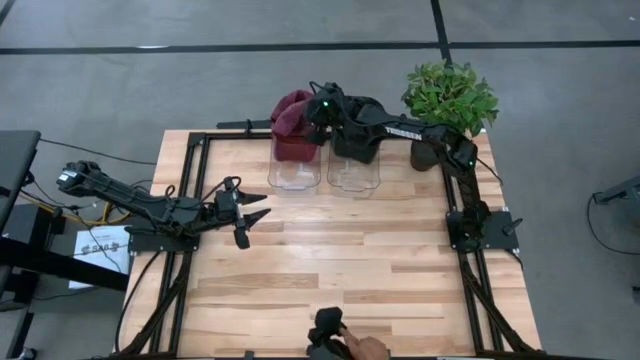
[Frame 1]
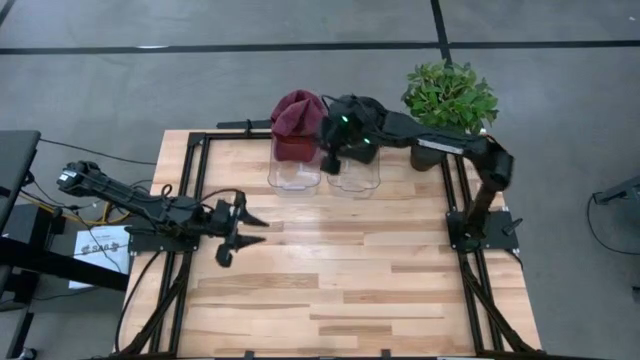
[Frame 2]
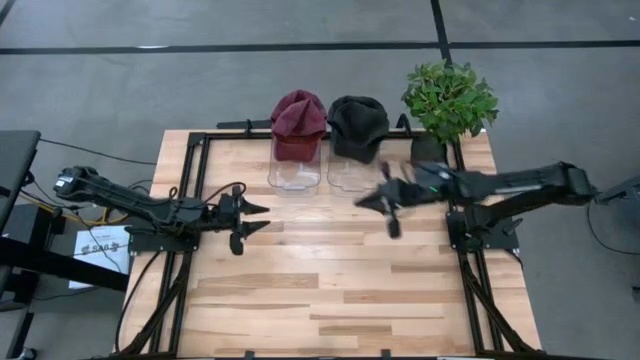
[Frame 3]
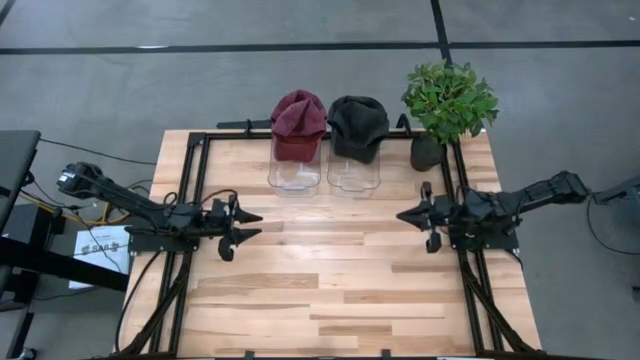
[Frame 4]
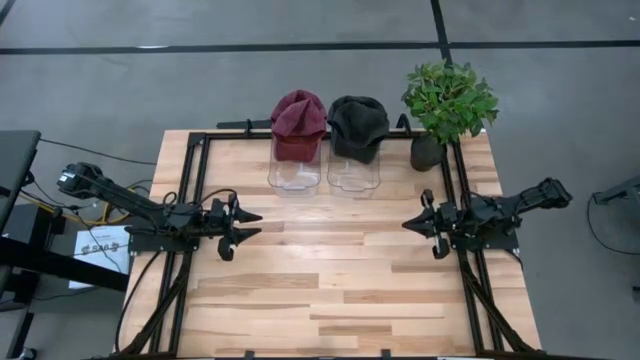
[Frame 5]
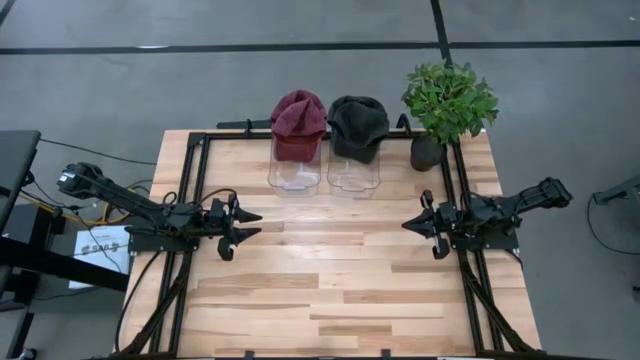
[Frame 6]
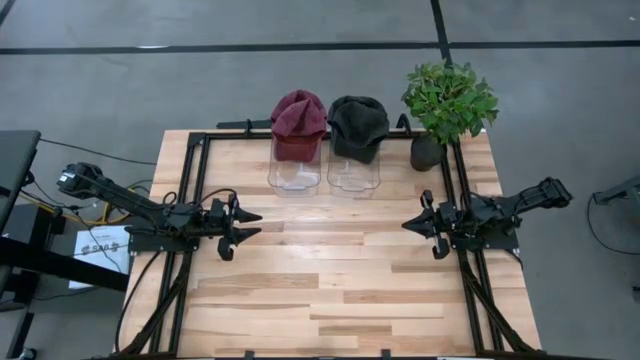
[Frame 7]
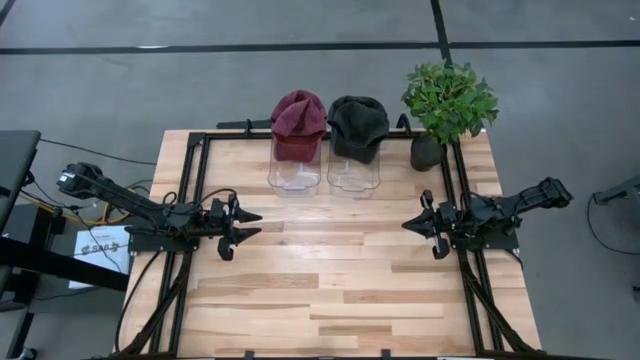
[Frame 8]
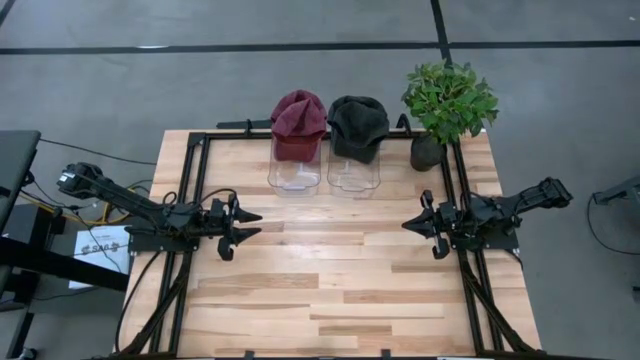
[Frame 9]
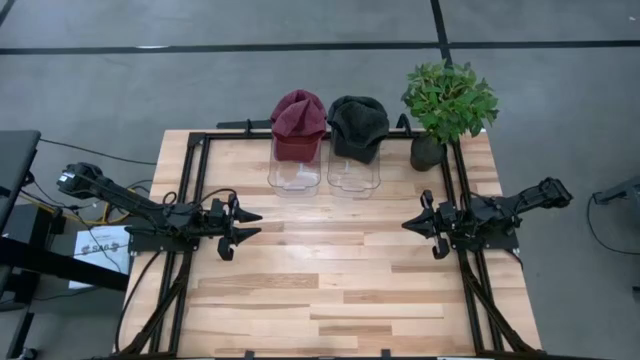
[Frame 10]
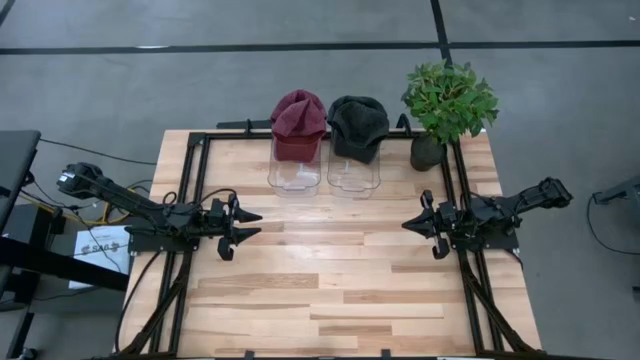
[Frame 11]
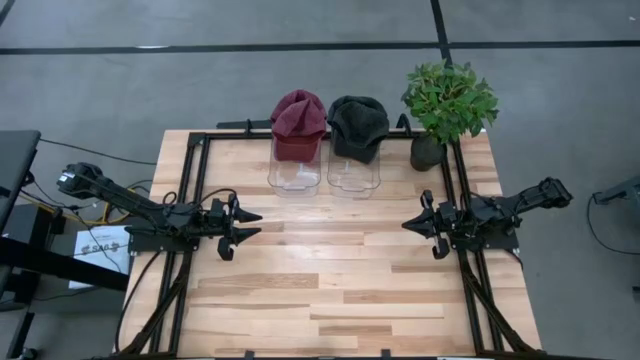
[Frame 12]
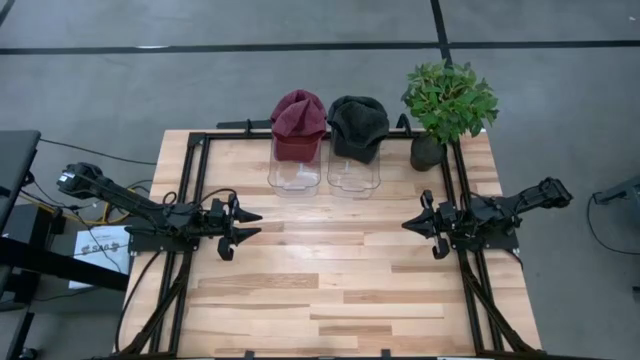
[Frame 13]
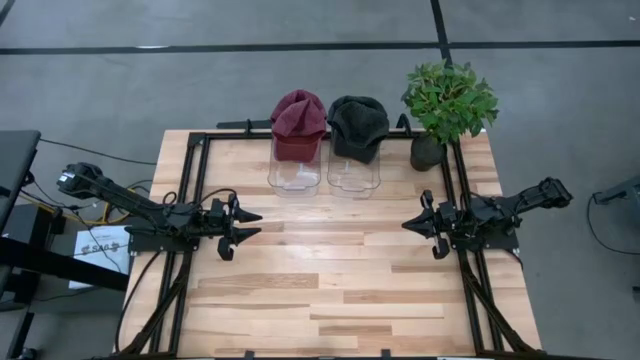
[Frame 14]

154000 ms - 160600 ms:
Task: Pick & Place hat
Return to Home Position

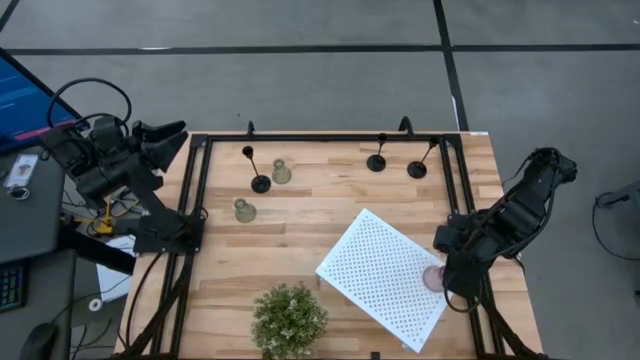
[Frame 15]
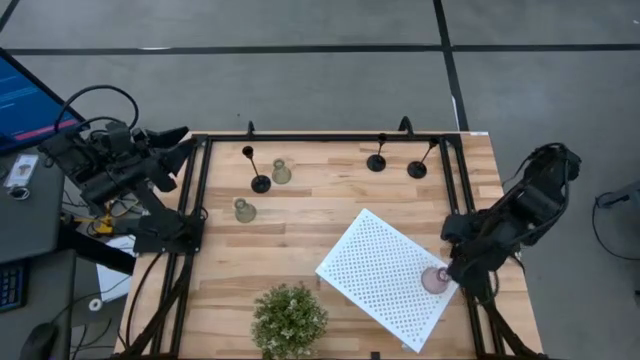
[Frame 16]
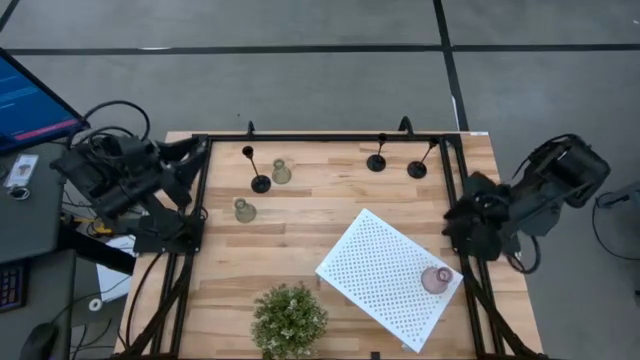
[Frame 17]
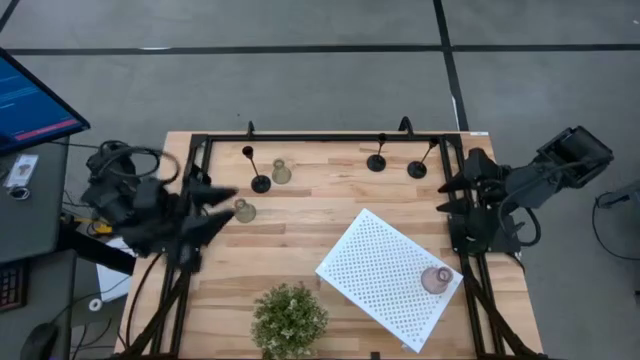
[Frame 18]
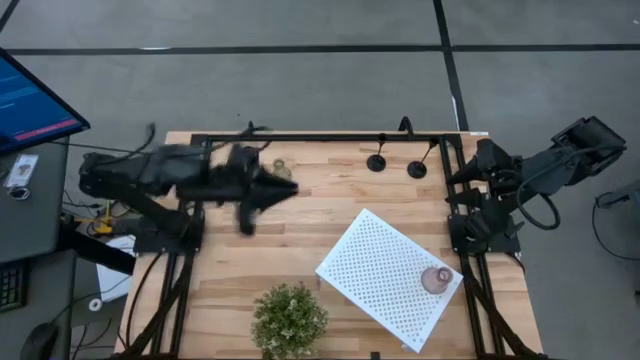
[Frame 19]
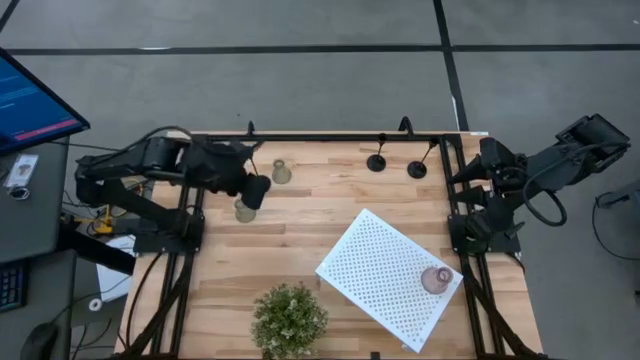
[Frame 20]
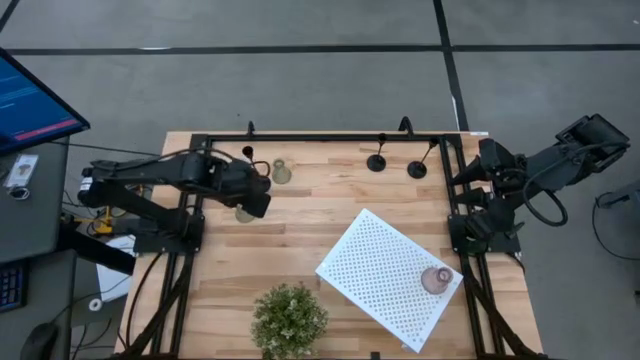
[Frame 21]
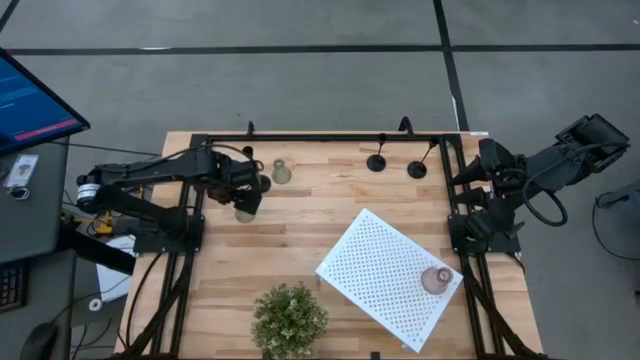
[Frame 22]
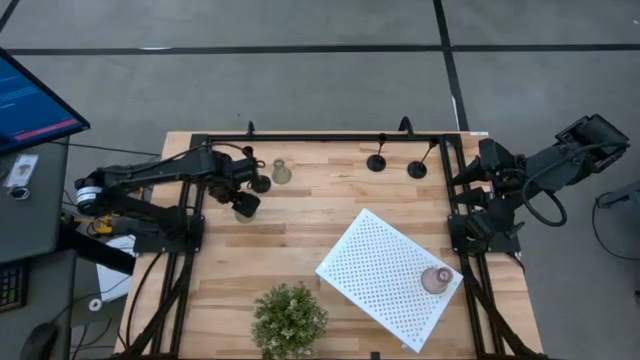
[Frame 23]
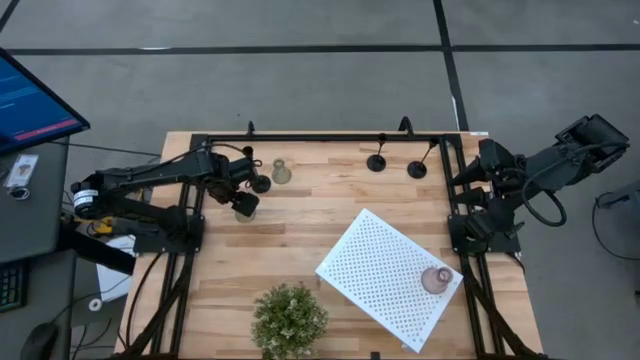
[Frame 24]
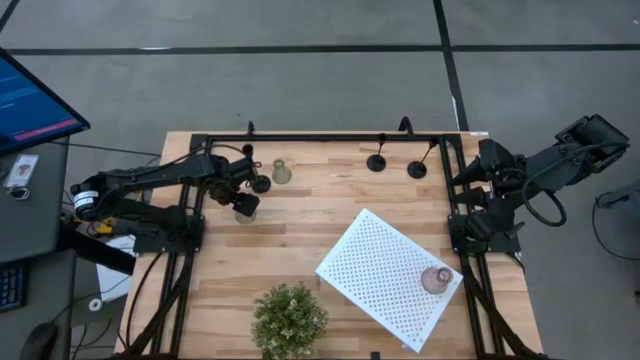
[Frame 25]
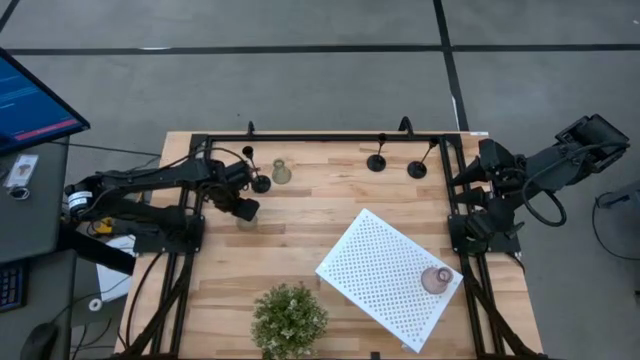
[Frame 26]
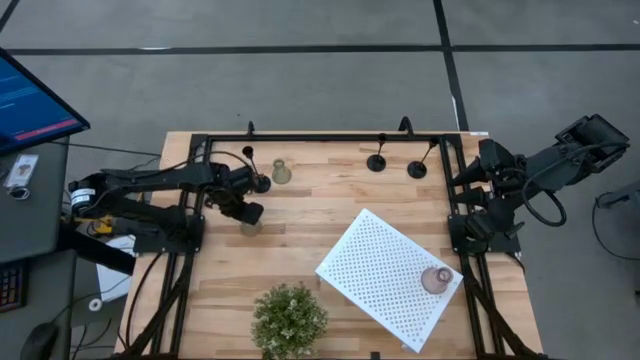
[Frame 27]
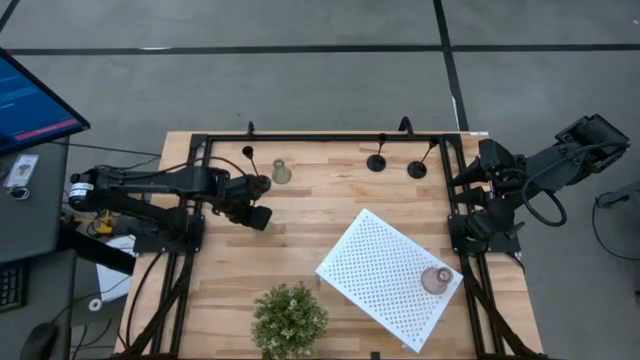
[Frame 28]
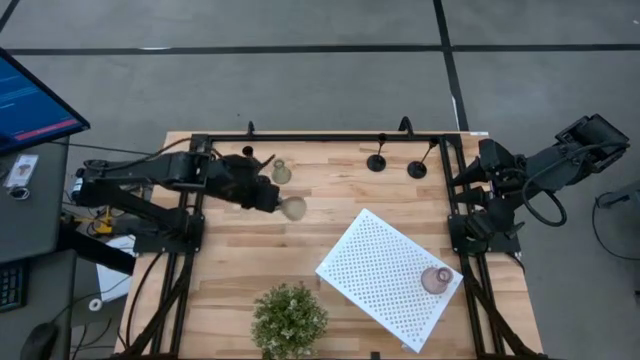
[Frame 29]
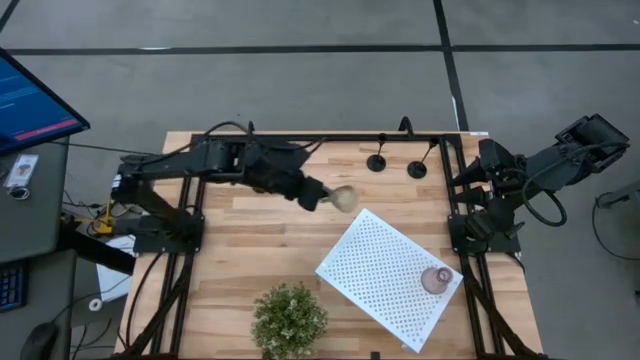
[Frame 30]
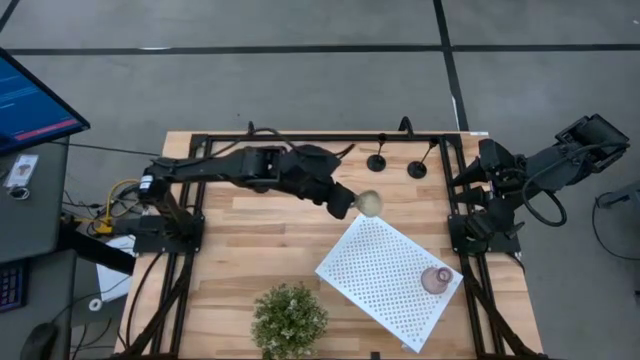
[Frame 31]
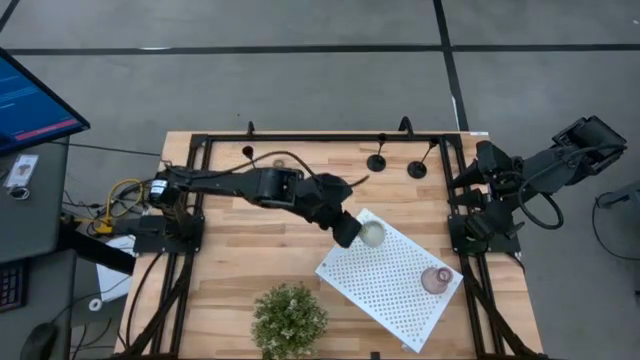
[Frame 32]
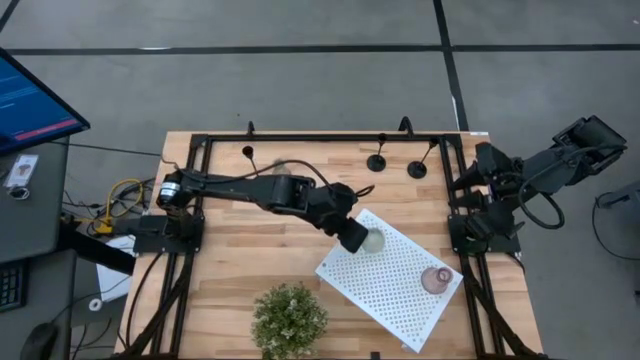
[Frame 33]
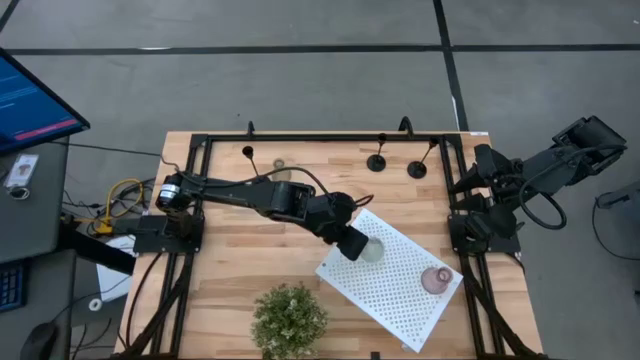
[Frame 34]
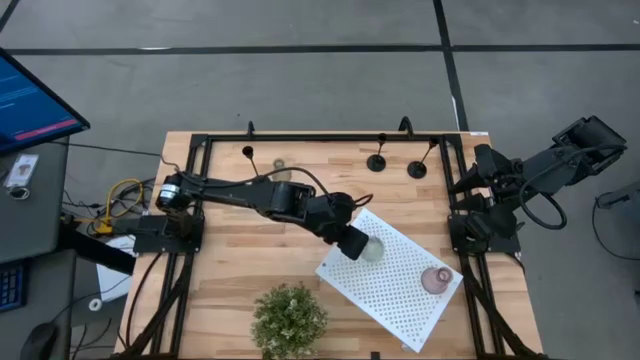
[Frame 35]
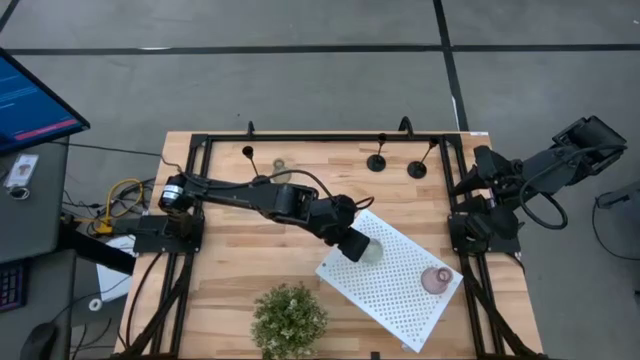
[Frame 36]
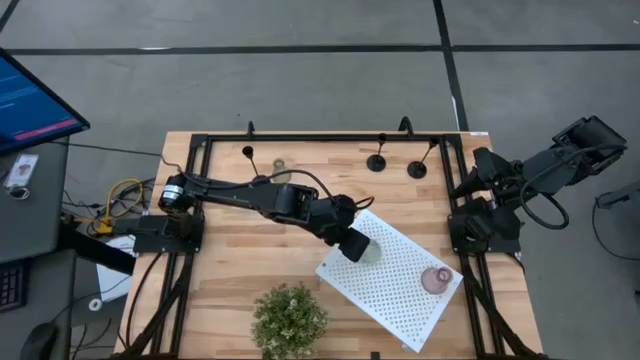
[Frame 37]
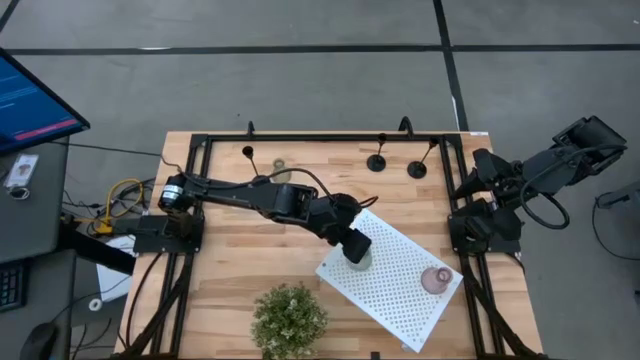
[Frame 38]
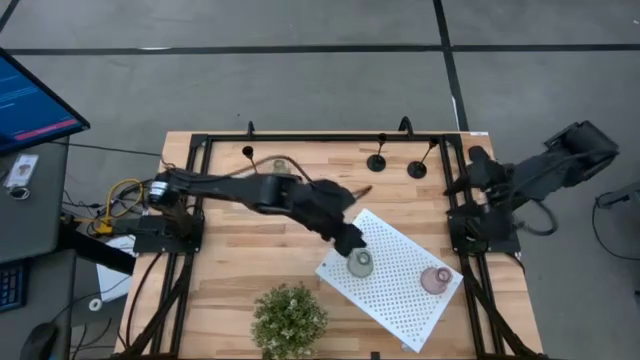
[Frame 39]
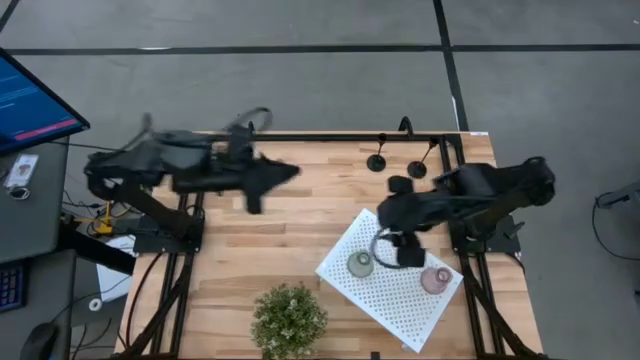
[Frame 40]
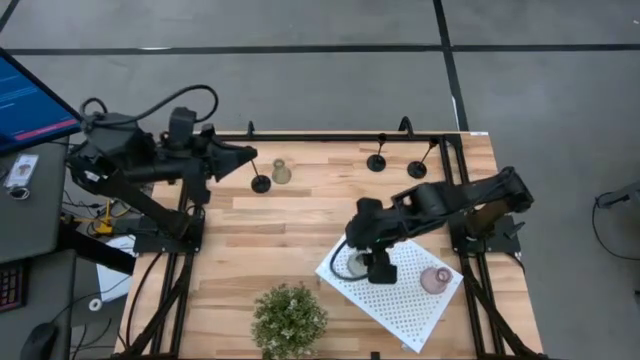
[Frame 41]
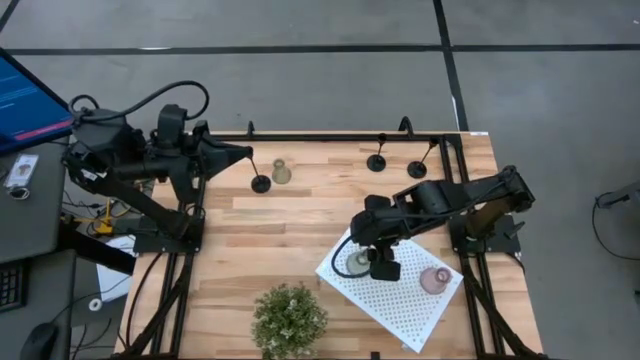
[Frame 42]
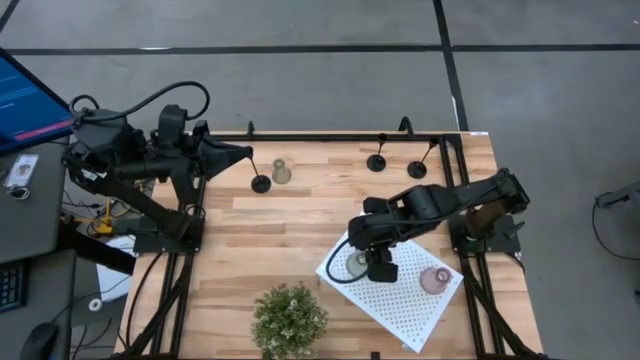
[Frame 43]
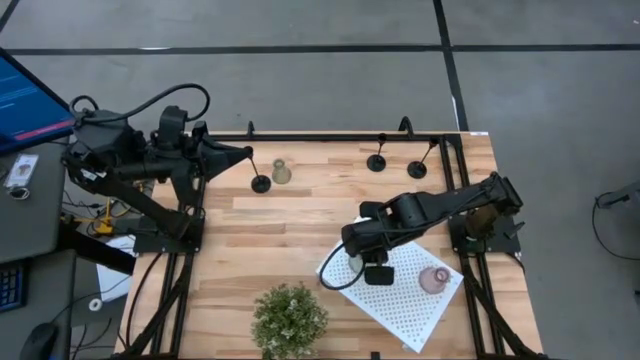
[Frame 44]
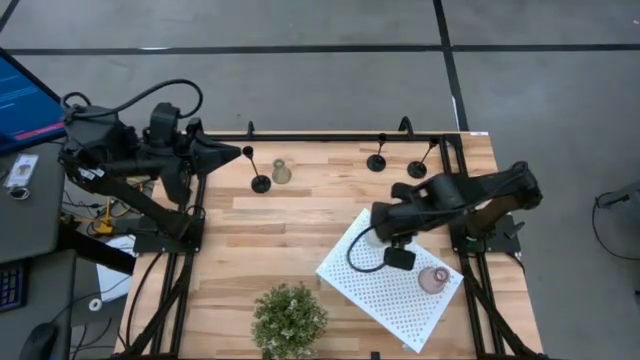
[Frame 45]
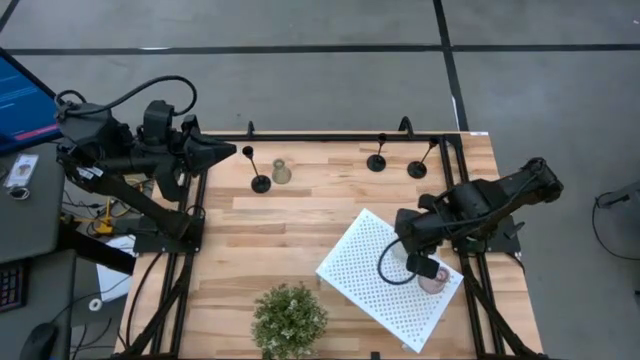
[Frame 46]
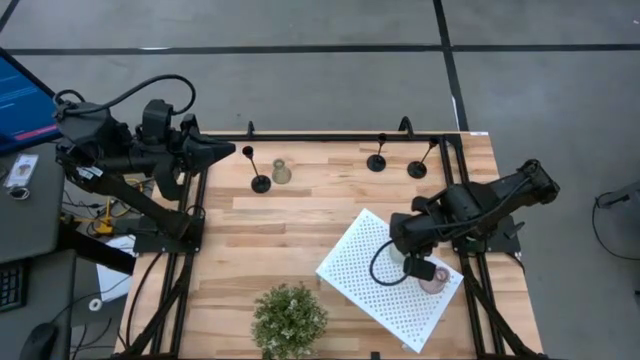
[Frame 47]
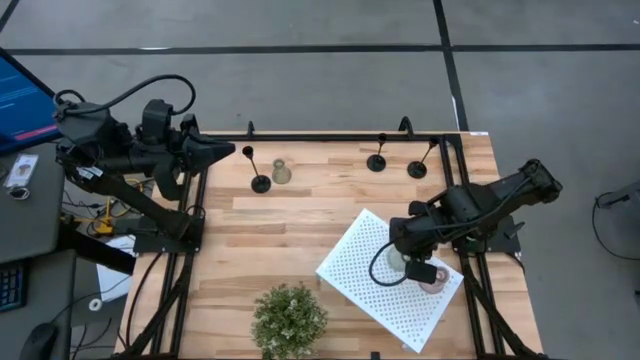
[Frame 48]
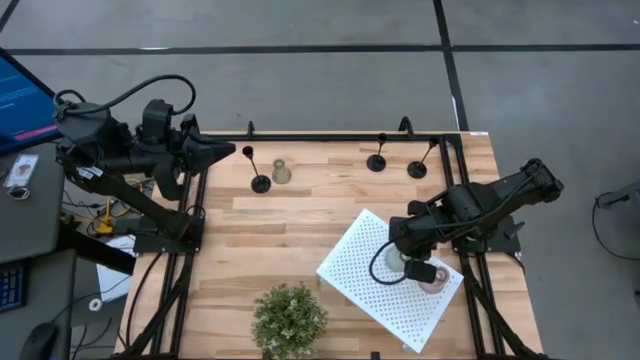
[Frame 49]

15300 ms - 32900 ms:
Task: Pick & Place candle stick holders
Put the bottom green glass candle holder on the shelf aligned with the pink glass candle holder
